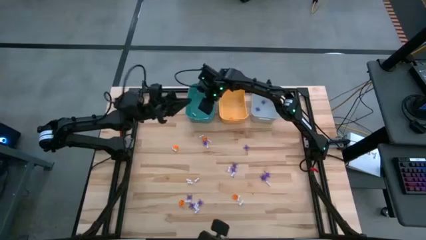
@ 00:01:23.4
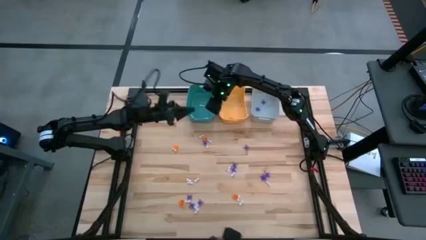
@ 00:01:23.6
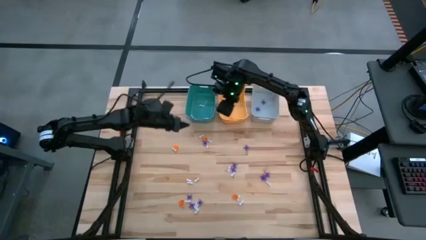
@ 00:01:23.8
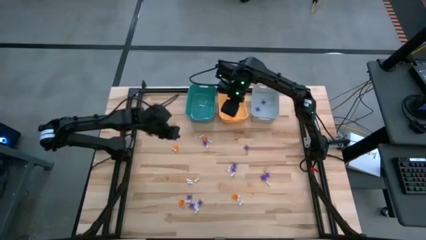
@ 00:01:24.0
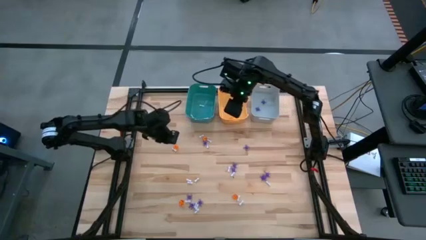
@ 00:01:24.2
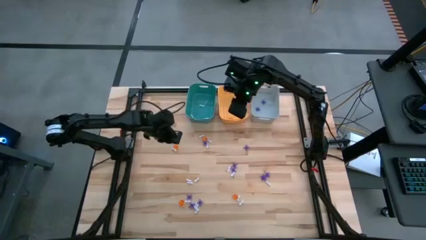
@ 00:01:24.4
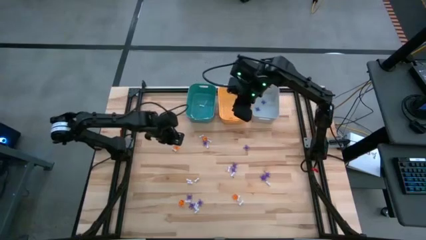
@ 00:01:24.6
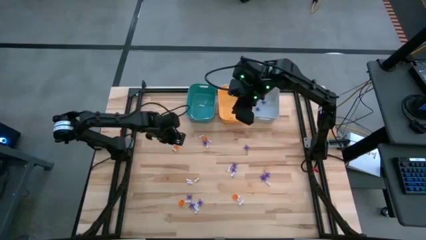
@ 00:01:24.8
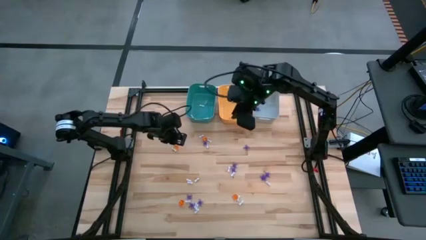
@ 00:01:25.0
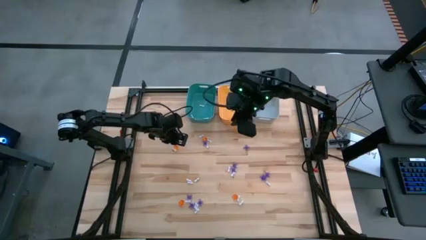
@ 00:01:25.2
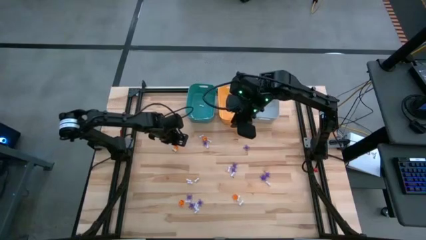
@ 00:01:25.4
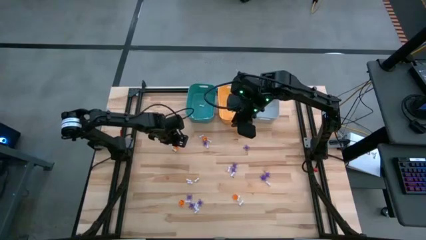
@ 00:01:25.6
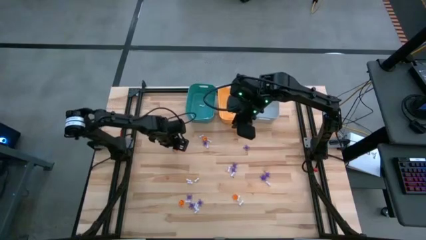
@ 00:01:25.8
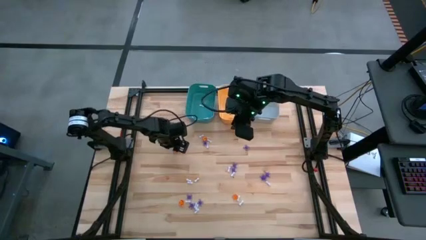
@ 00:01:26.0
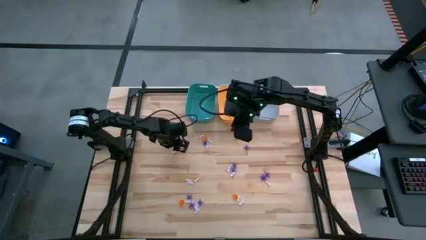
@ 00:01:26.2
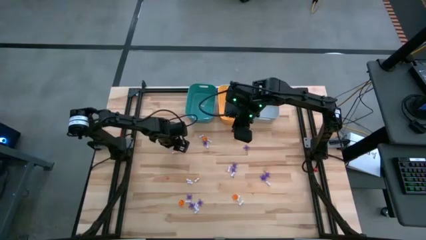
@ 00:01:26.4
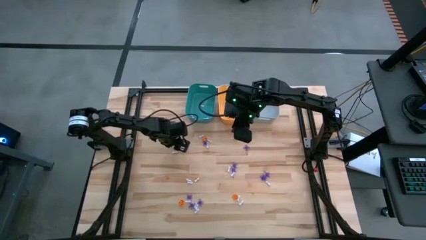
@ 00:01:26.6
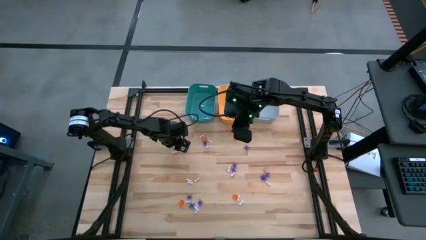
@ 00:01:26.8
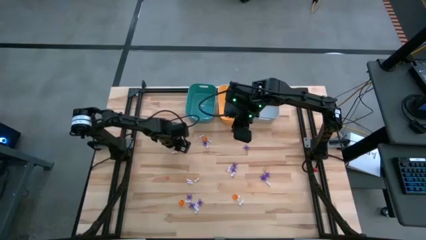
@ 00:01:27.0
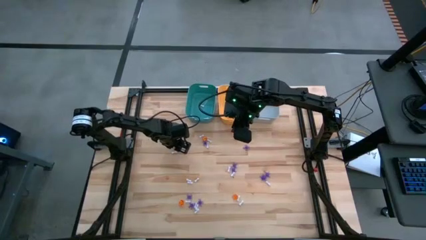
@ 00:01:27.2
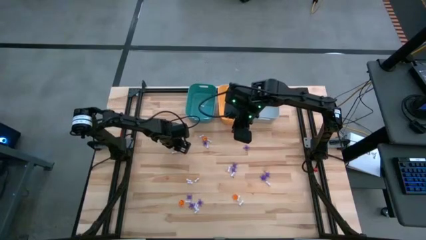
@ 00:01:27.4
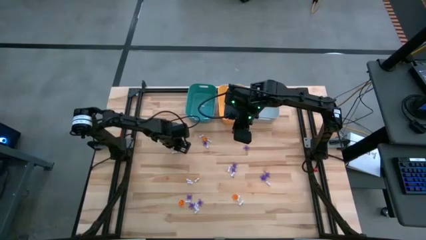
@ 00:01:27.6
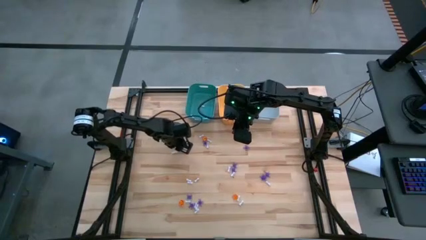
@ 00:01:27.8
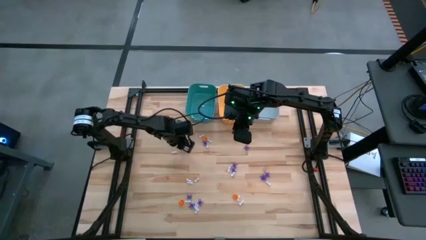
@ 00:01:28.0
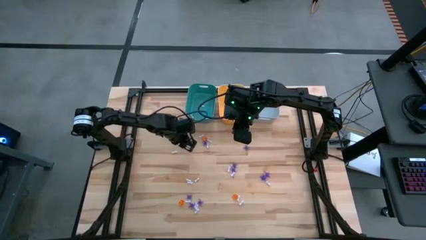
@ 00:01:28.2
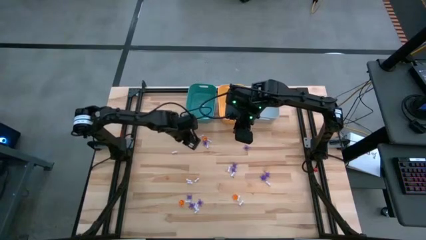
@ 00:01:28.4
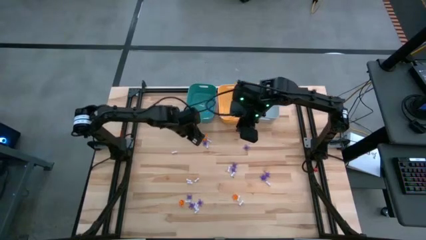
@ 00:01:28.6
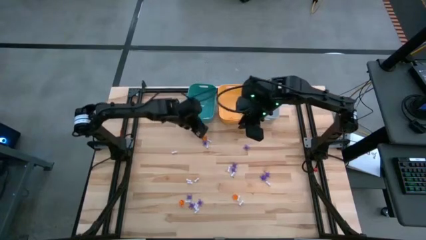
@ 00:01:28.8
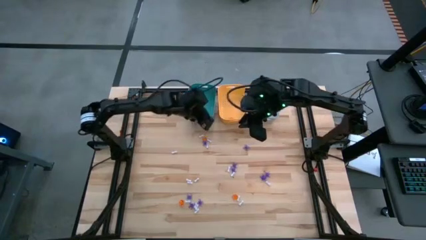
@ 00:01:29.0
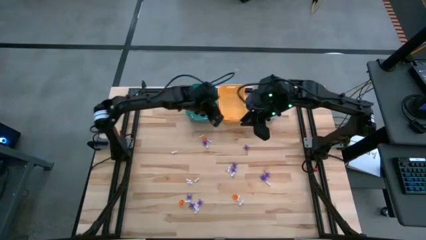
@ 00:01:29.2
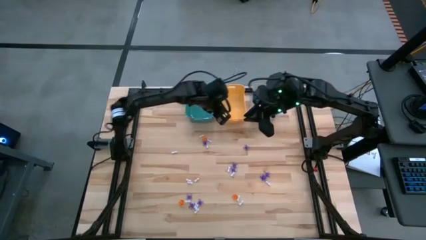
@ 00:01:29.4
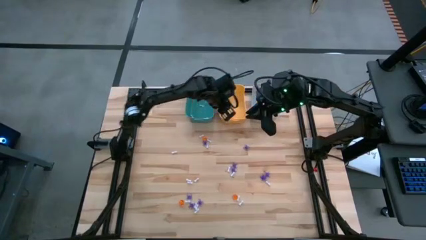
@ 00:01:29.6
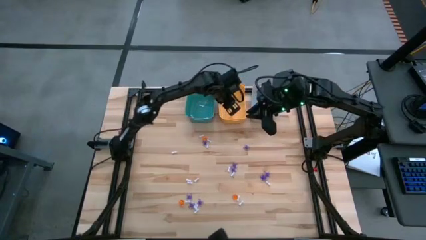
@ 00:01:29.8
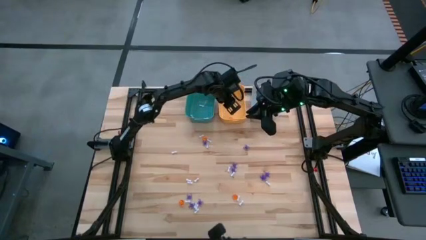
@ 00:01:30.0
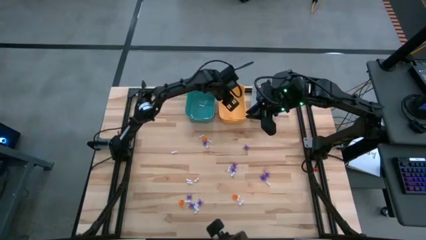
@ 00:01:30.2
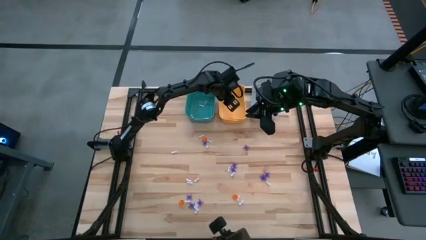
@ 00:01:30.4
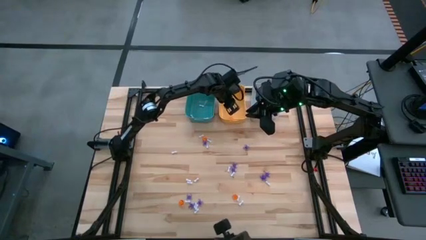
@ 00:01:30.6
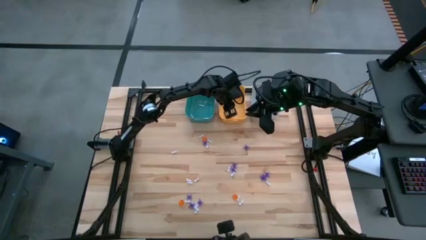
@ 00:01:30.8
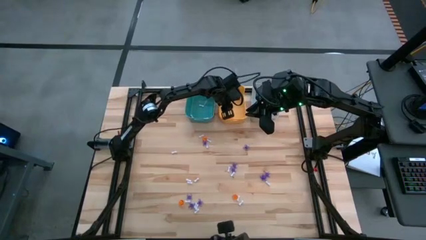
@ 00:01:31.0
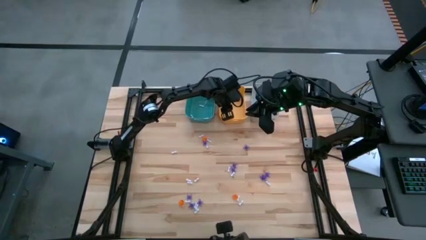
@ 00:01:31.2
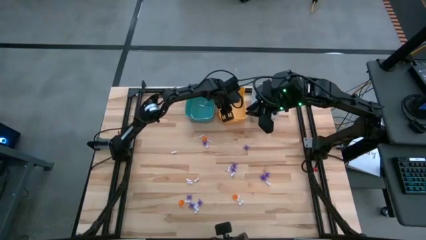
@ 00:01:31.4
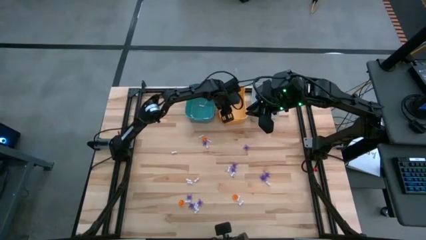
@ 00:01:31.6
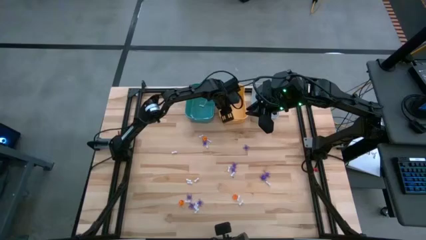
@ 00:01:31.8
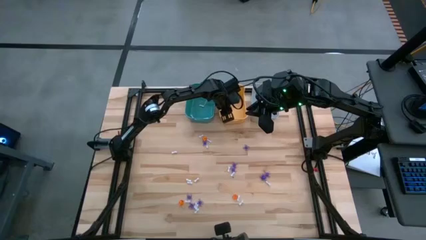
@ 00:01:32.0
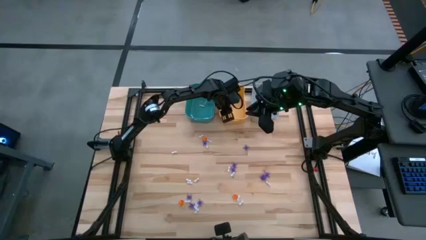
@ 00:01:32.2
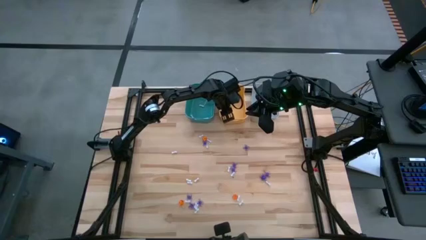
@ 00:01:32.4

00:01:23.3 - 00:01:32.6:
Task: Sort Halloween decoration
Put the orange pumpkin toy into the yellow bin
